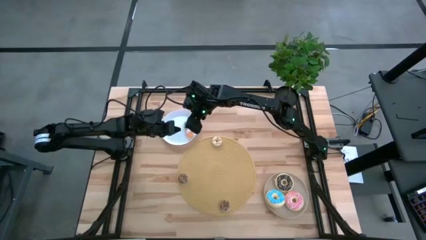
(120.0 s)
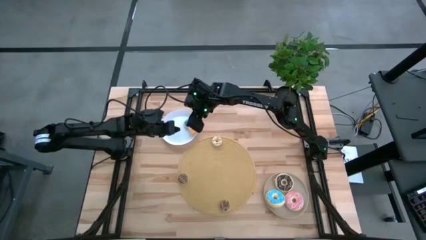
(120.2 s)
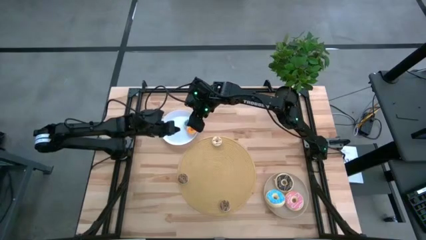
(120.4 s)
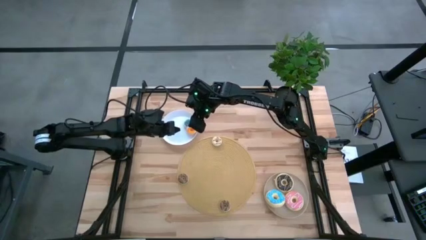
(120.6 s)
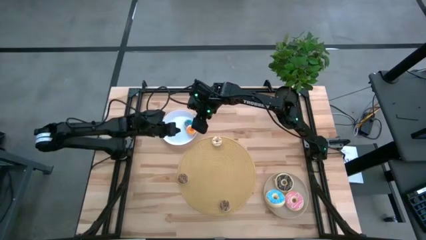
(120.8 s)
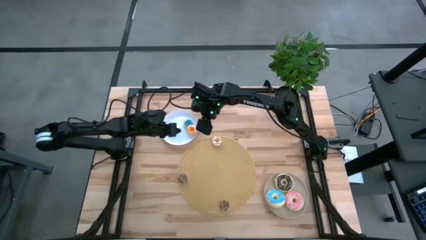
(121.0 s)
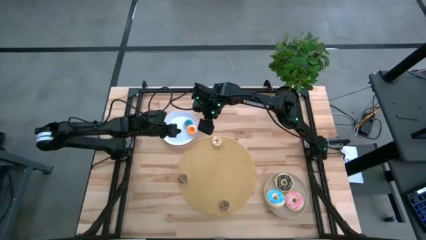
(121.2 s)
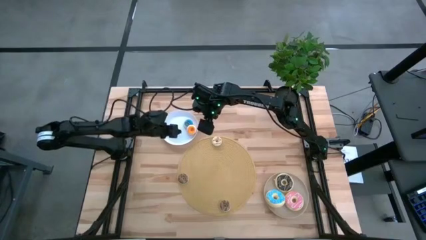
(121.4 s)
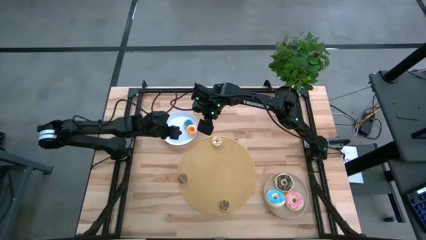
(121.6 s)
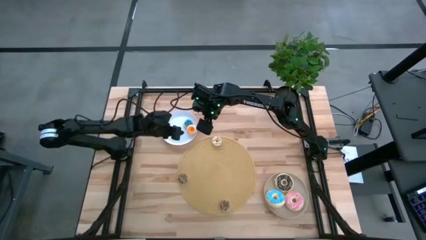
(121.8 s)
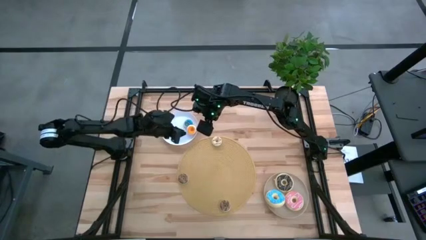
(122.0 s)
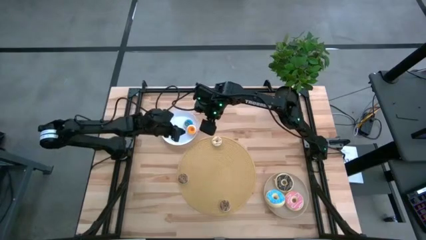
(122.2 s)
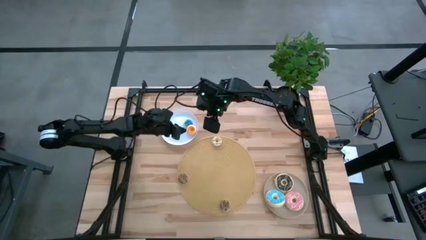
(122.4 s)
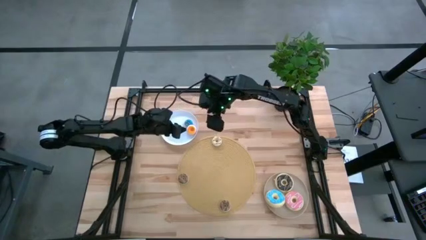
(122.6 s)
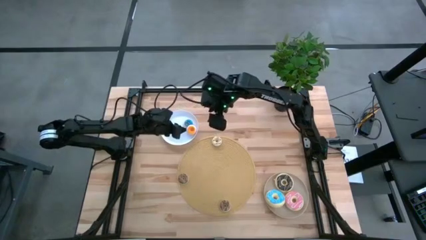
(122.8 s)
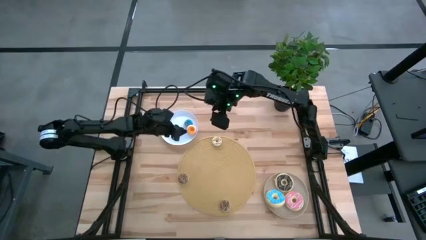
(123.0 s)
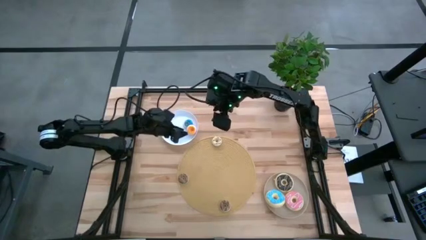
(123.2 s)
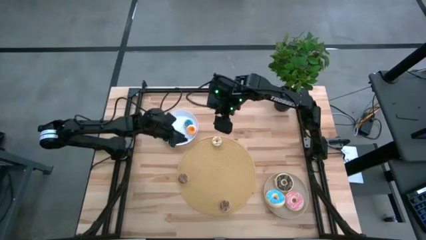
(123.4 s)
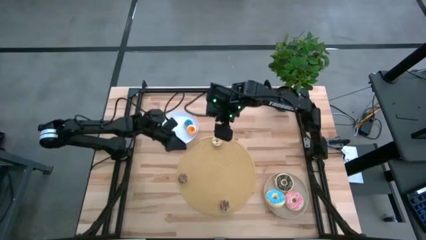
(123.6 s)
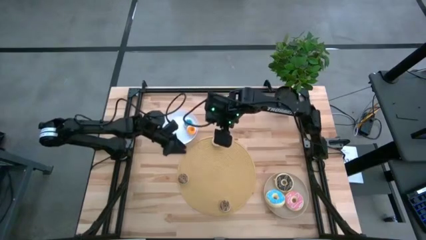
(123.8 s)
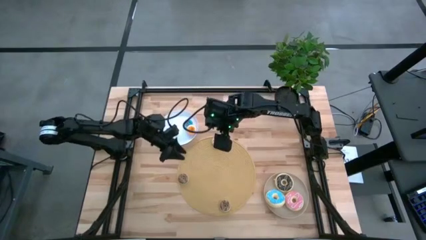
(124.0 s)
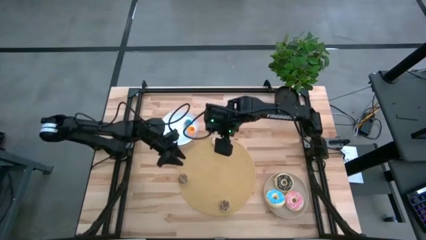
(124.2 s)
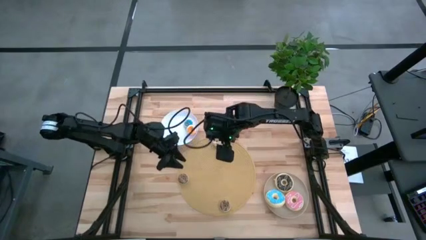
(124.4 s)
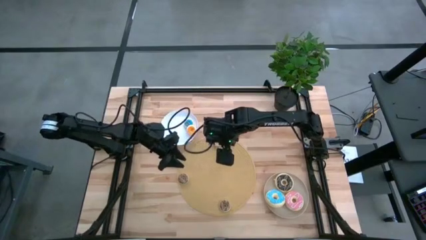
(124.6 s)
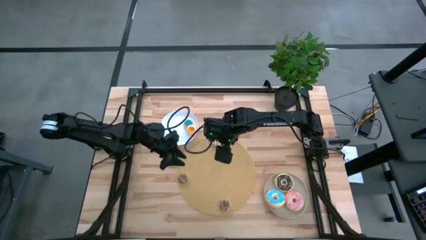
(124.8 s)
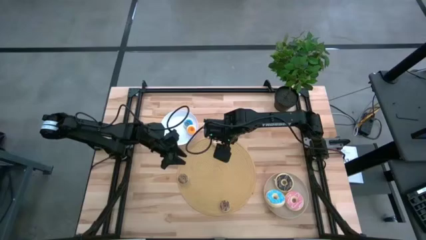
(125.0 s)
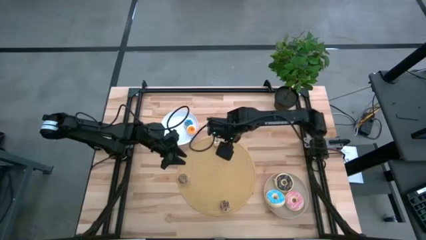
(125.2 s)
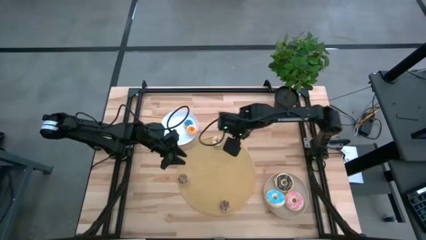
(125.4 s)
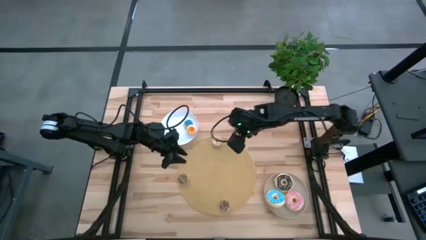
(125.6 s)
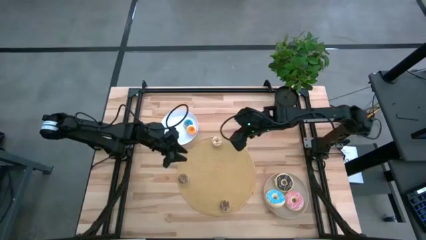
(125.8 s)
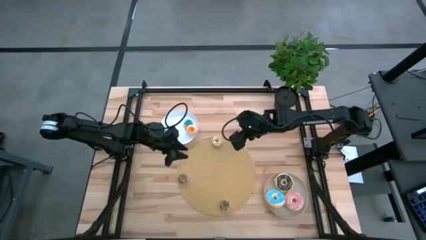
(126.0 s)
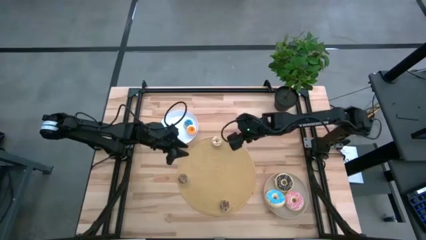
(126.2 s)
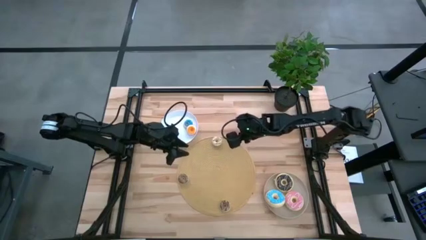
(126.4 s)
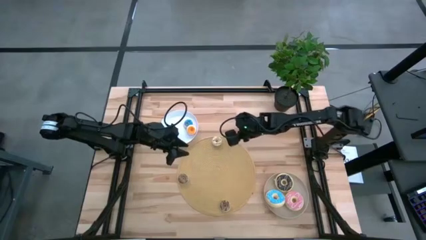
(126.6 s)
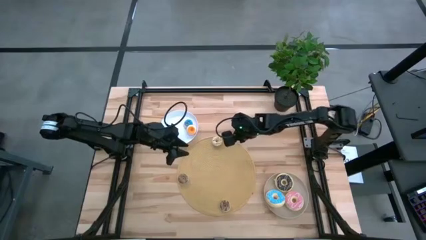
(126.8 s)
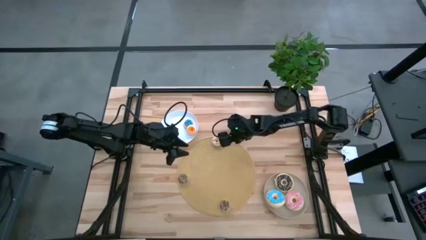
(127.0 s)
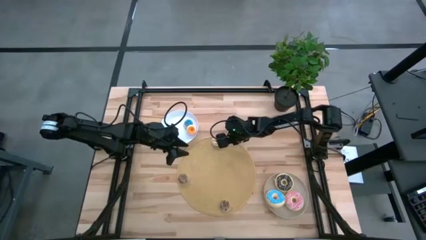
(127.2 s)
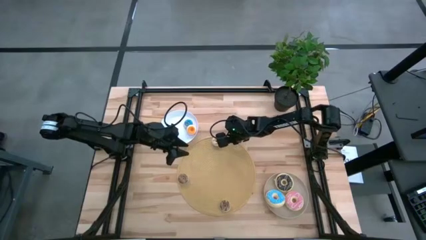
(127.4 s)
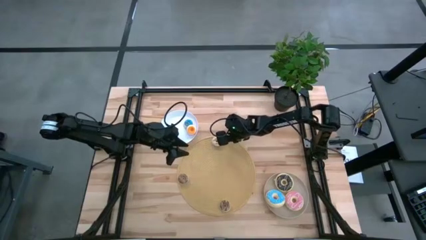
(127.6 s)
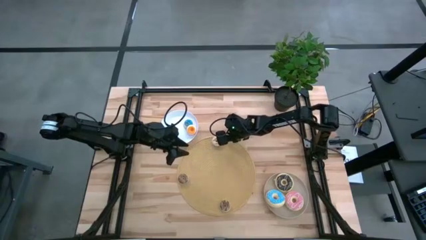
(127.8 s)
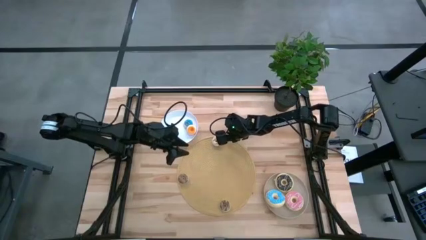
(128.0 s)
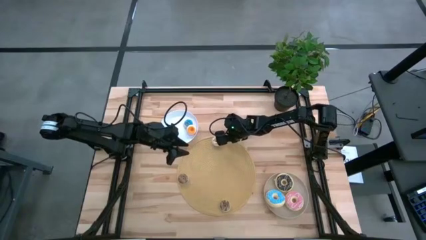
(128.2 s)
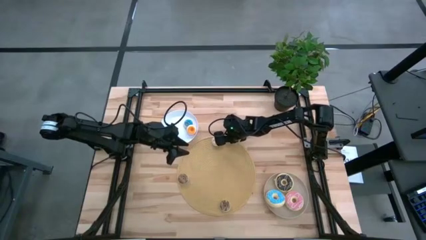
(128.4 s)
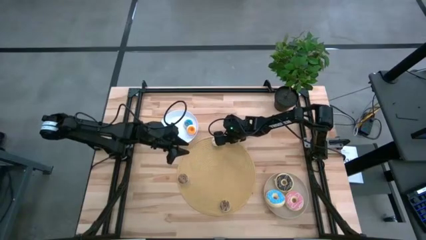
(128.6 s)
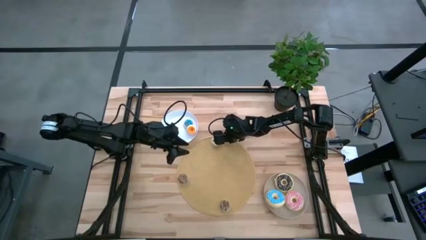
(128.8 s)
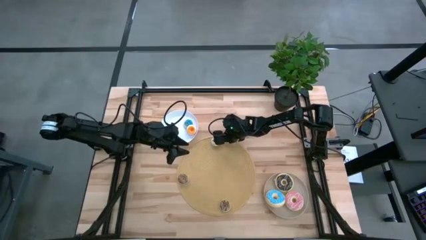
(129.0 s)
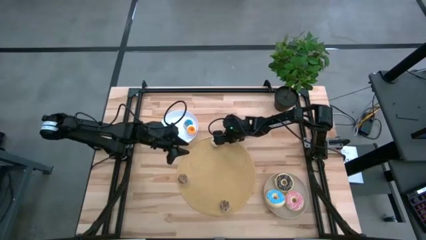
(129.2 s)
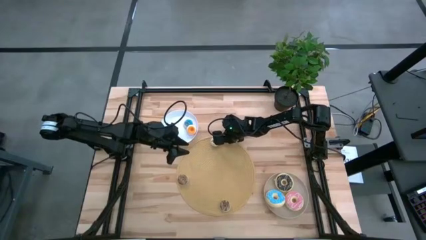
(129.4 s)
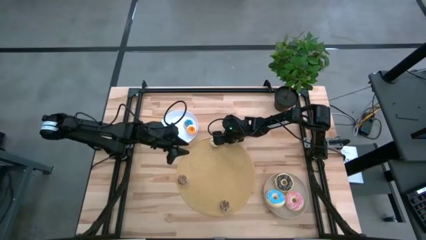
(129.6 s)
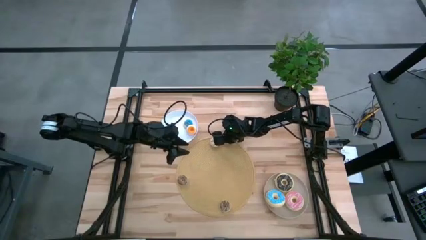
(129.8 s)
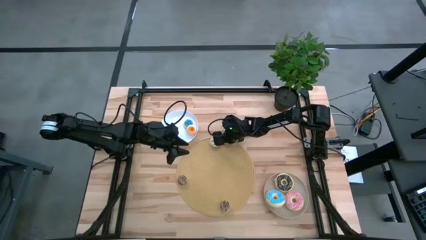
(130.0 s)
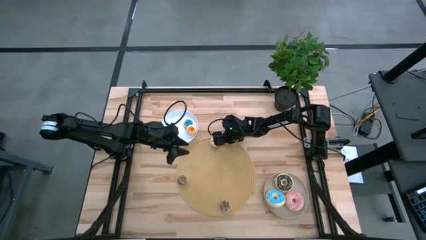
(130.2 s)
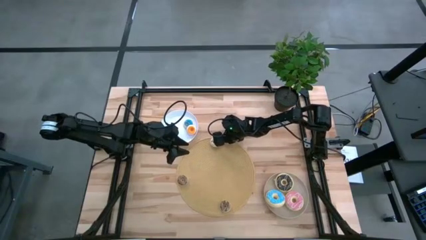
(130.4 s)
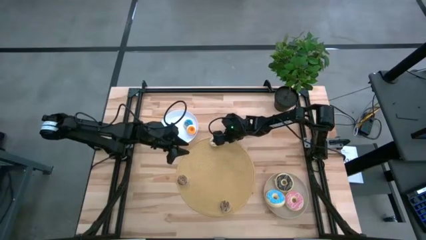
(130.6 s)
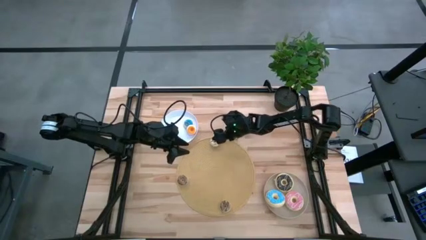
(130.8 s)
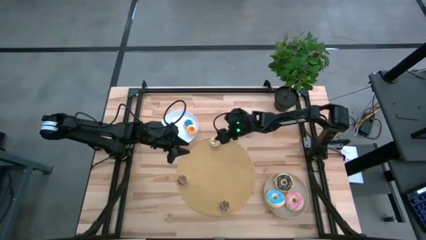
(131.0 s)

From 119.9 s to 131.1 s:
Task: Pick & Place donuts
Put the small brown donut into the white plate
